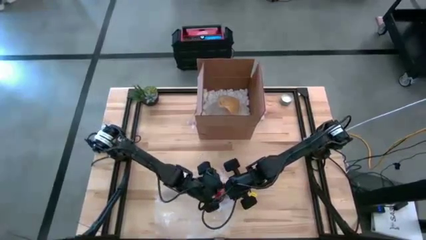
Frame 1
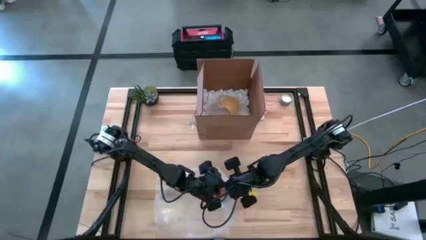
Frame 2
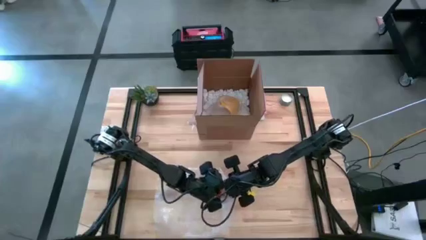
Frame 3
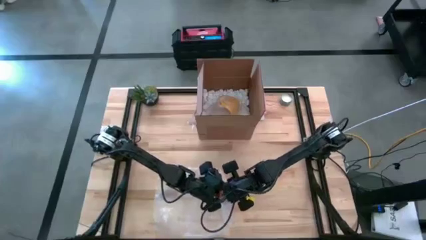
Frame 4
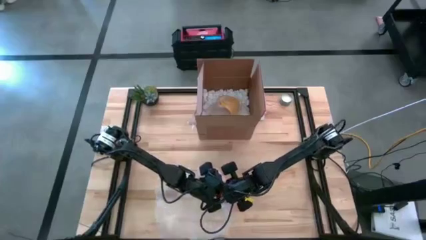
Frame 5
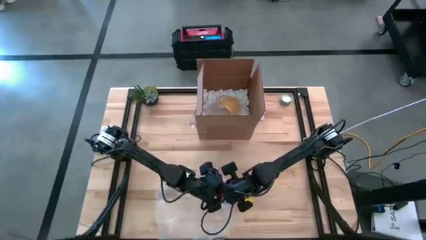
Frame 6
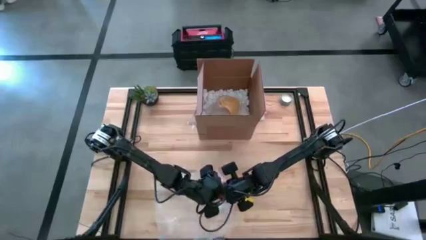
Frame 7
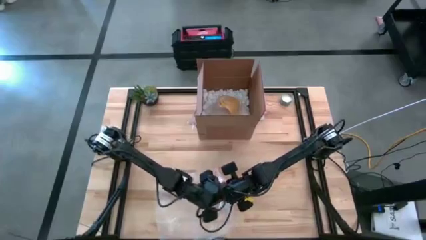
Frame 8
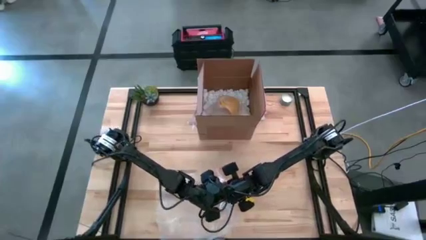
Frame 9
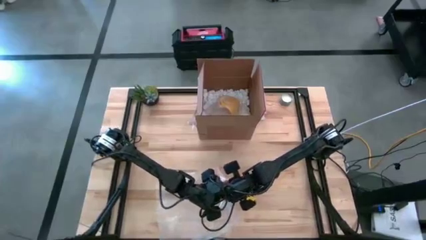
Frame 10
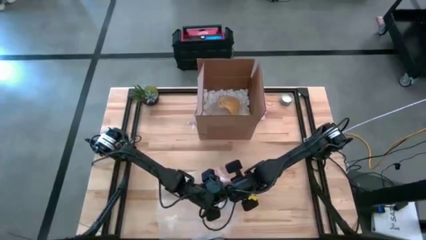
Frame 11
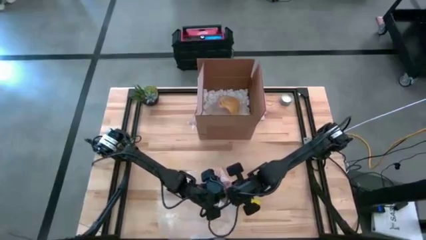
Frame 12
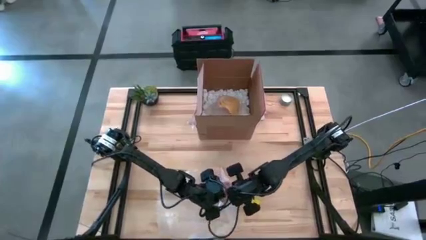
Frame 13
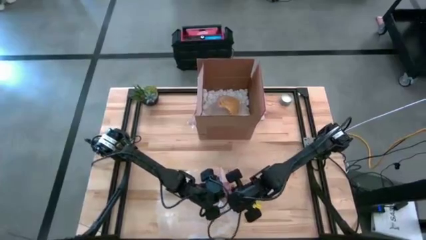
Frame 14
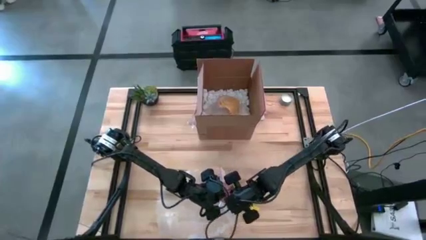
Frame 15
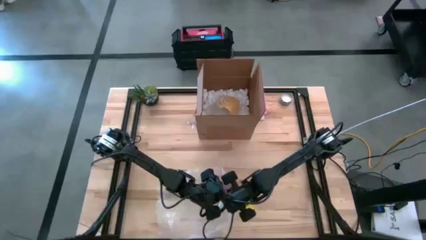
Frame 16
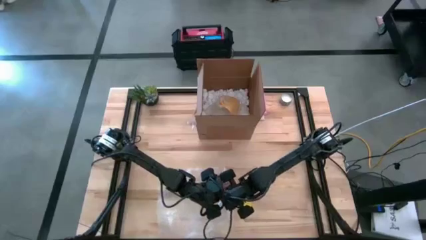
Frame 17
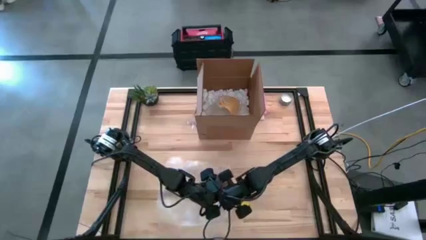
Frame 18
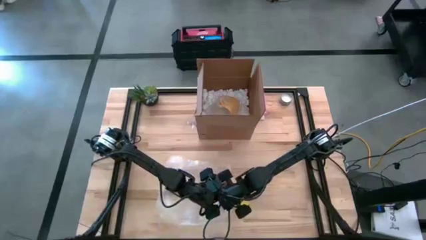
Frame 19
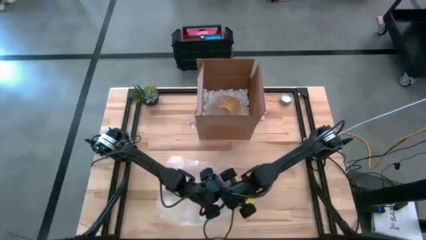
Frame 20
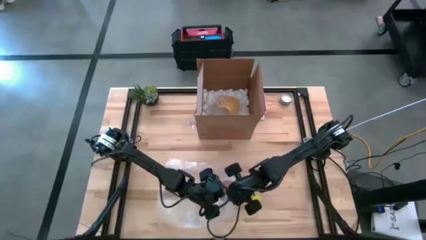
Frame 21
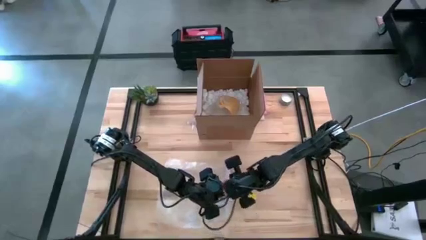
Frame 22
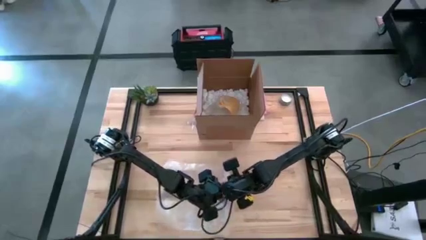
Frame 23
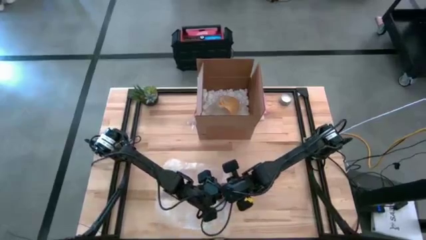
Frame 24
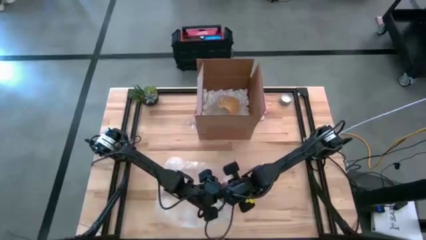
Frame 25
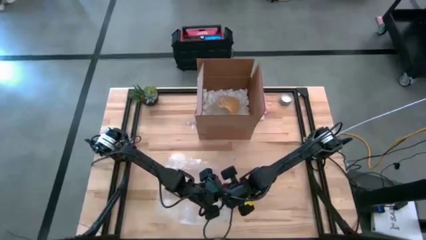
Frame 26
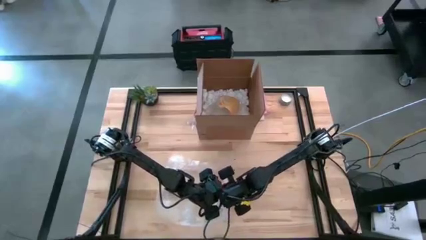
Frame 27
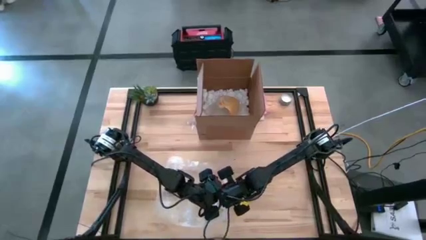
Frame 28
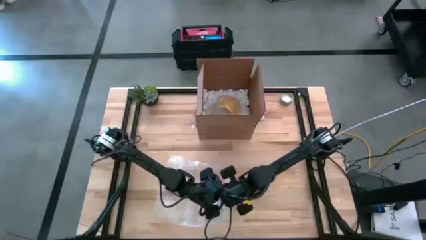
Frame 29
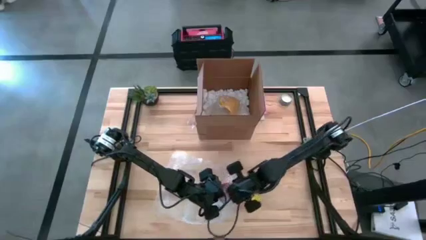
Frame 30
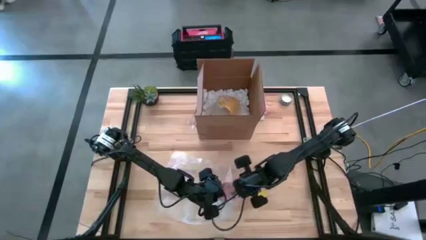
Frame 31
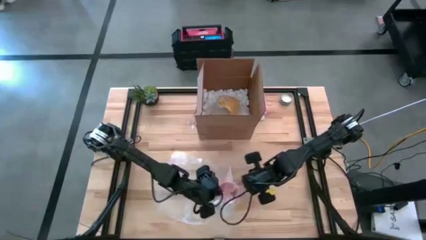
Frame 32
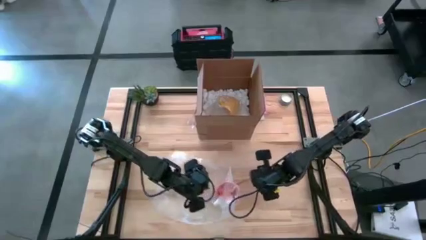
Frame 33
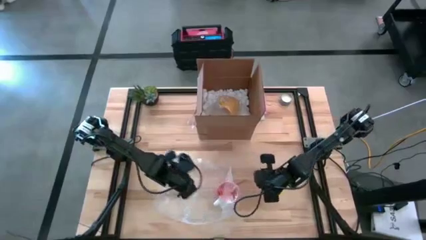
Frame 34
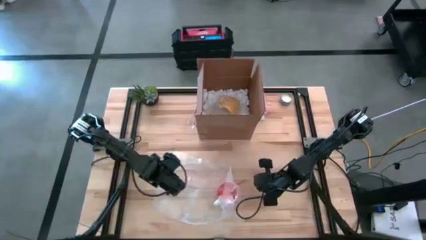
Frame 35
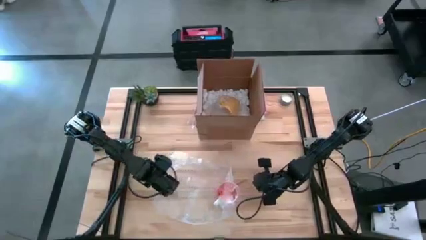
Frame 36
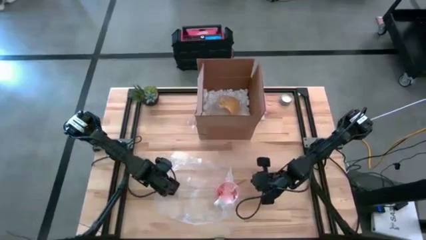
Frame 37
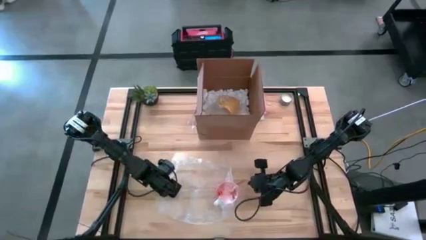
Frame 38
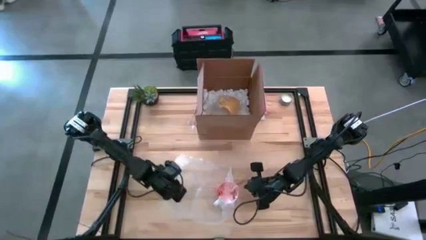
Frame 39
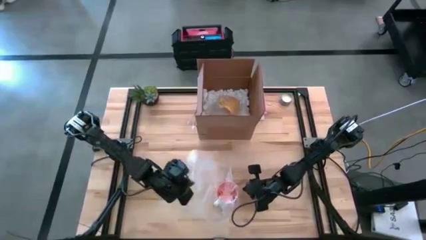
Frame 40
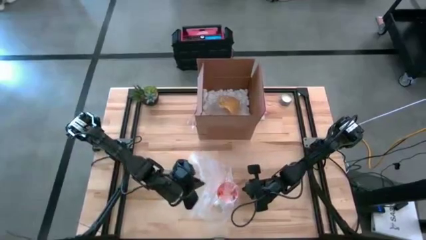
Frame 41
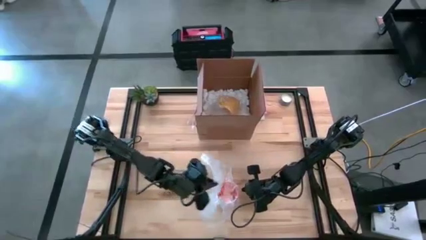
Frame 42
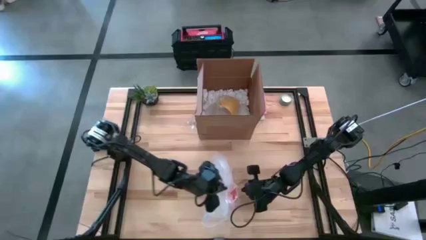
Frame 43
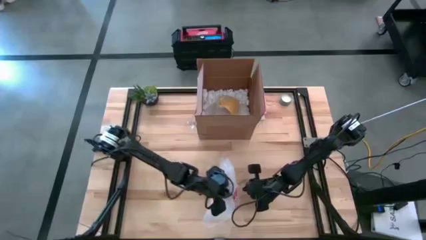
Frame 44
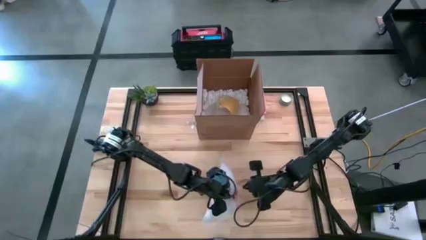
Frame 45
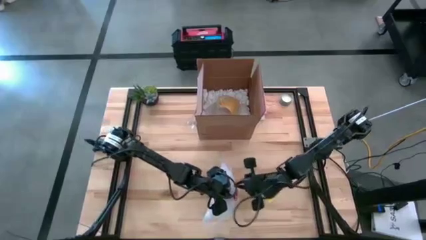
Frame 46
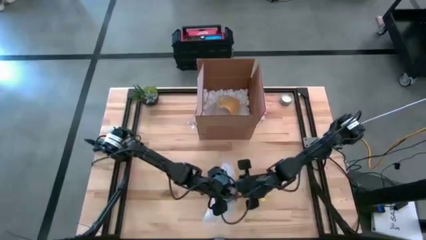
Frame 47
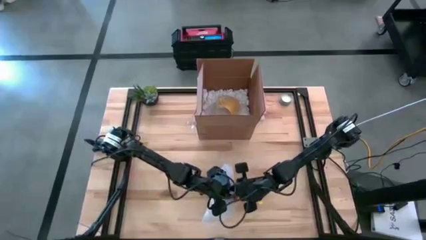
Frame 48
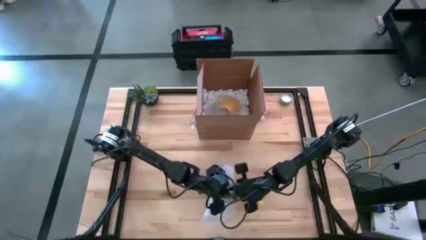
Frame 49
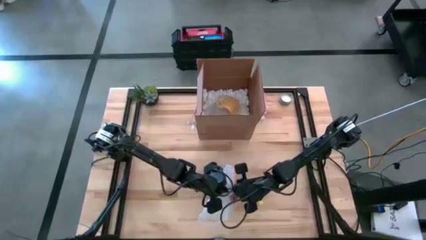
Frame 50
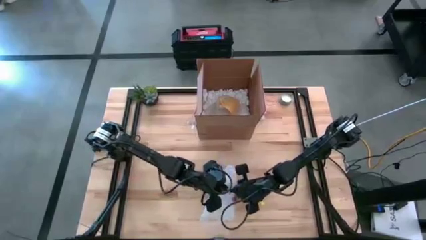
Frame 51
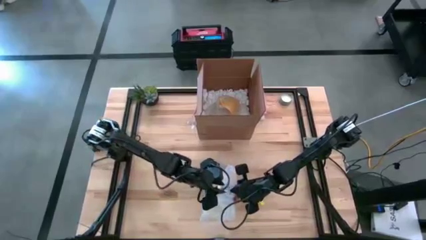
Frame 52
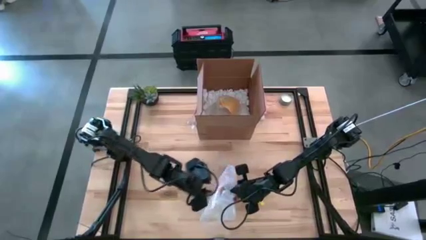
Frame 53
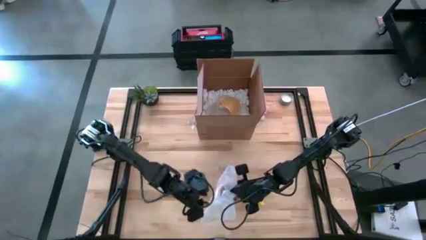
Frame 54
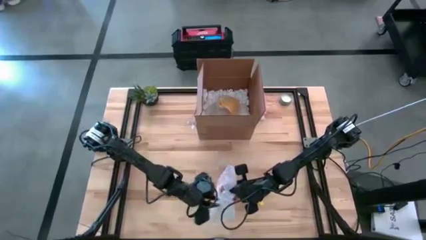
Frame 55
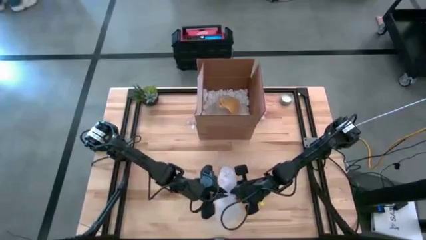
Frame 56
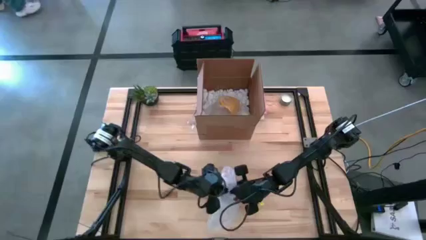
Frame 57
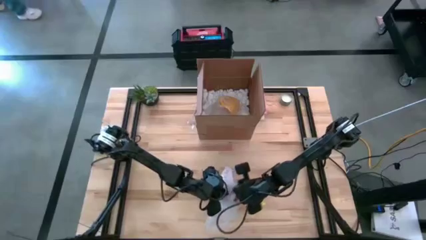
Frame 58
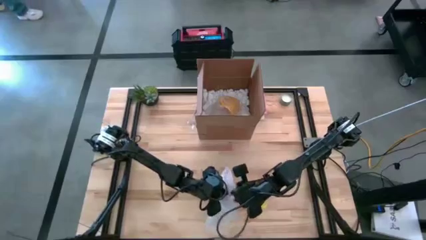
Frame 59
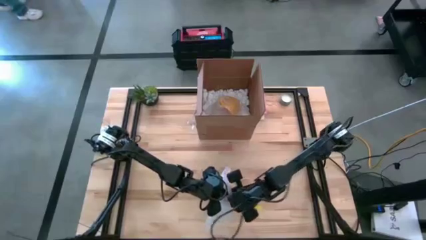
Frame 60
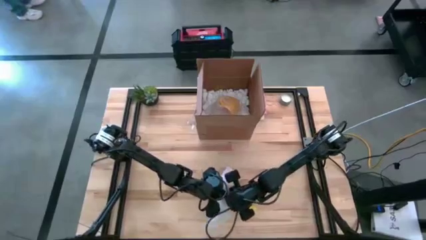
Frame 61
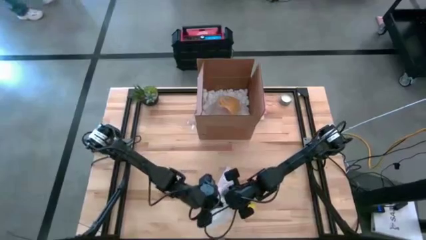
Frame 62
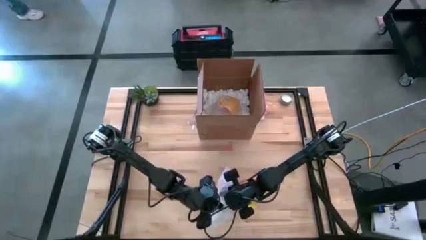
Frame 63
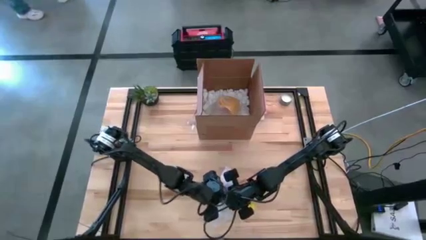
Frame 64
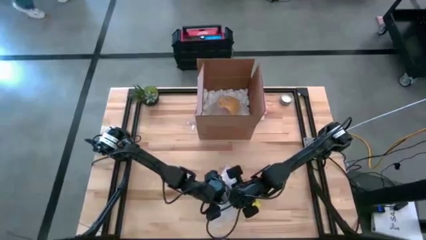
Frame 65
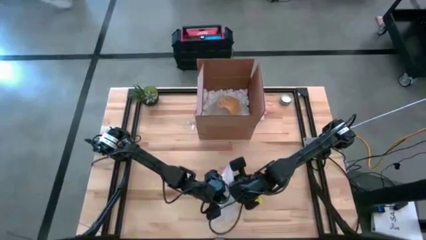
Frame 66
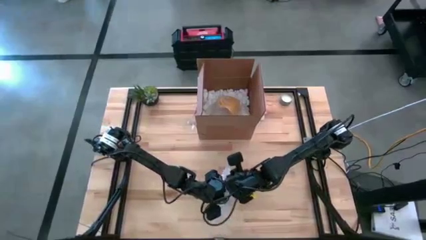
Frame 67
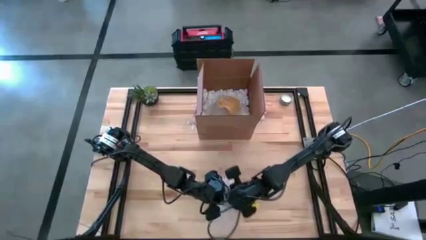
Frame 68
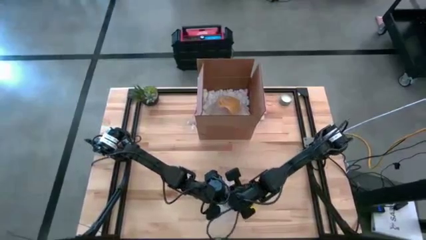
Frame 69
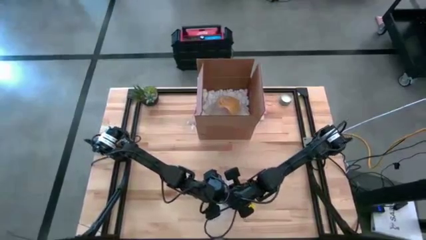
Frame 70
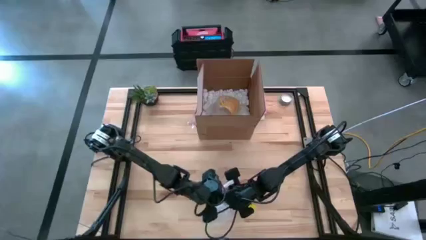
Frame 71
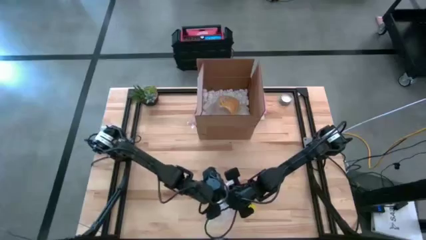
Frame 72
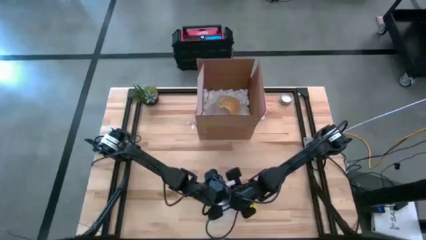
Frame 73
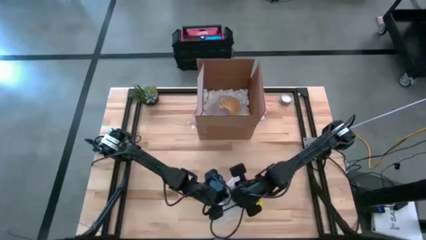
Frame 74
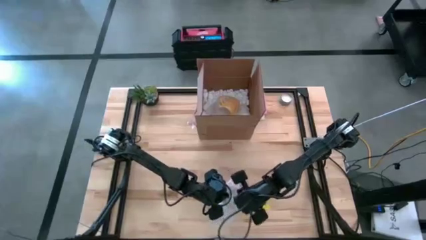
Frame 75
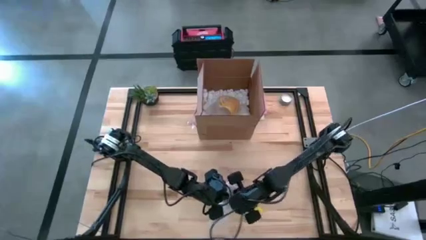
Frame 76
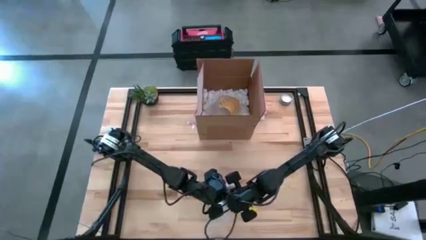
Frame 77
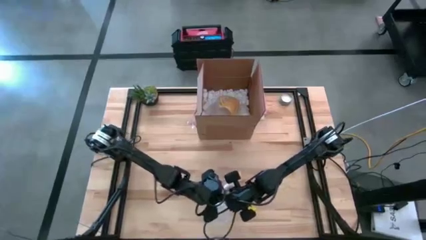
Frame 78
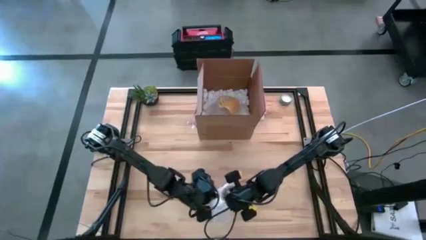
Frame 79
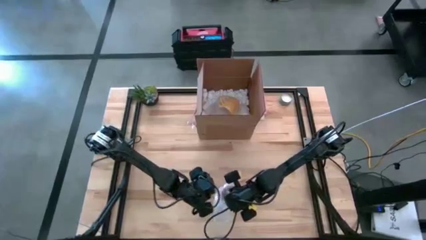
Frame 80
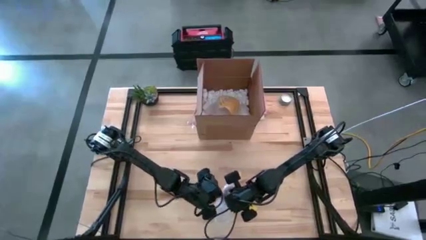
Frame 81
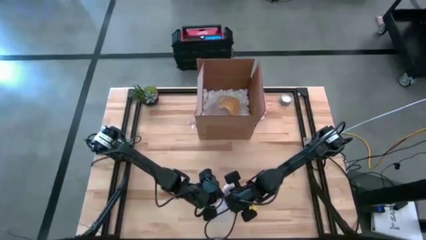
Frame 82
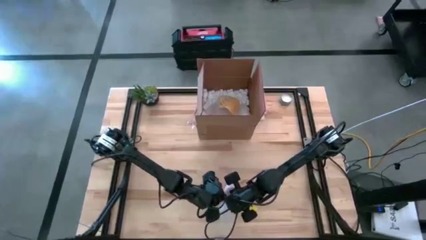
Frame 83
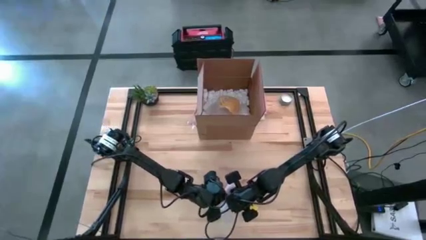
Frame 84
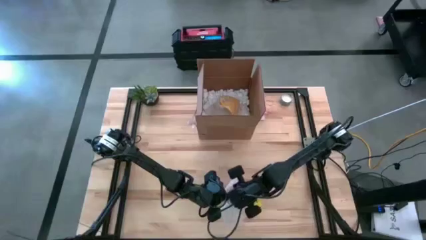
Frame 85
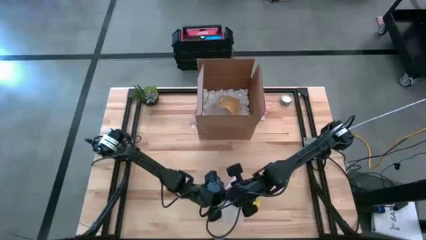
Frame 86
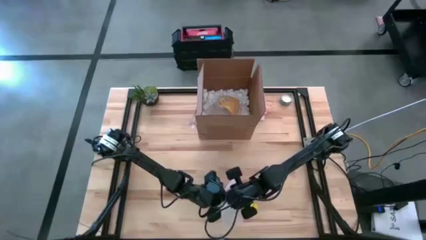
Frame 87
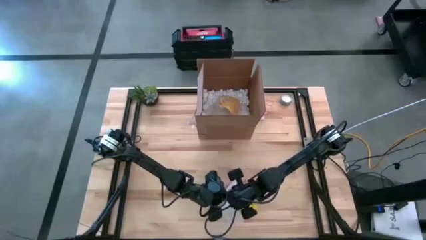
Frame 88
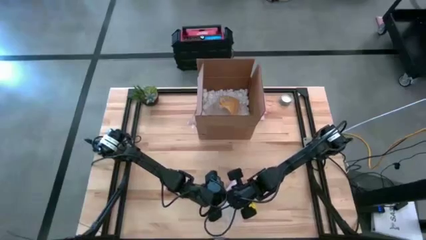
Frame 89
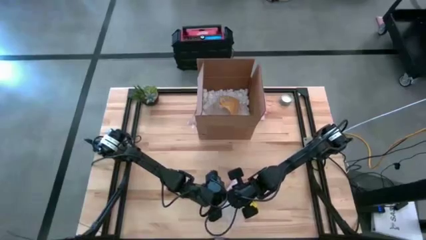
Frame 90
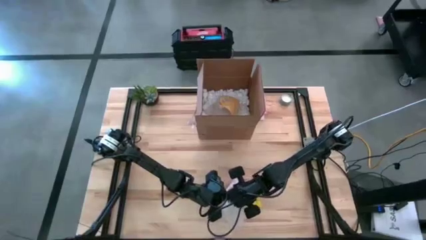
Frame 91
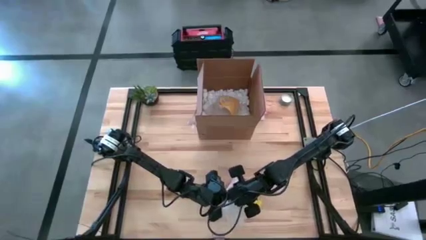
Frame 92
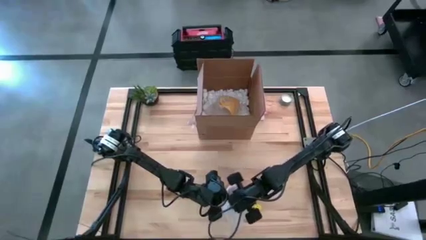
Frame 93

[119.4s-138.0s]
Task: wrap mug
Wrap the orange mug with the transparent bubble wrap
